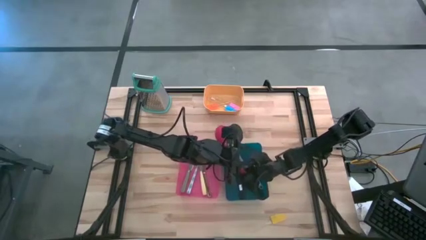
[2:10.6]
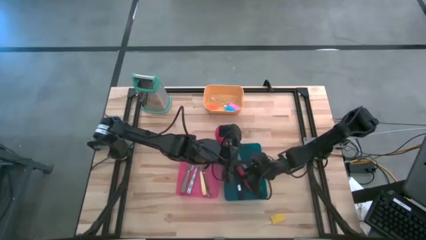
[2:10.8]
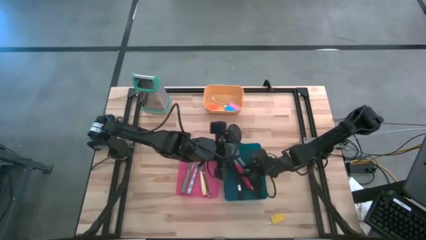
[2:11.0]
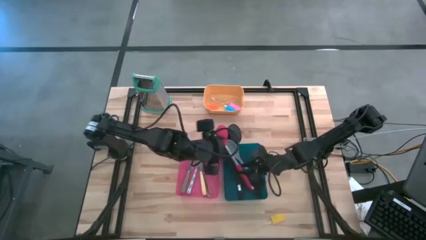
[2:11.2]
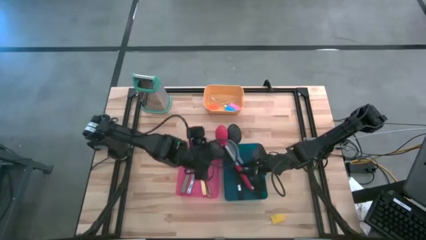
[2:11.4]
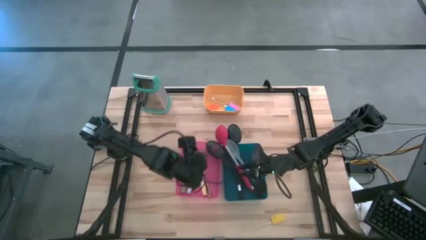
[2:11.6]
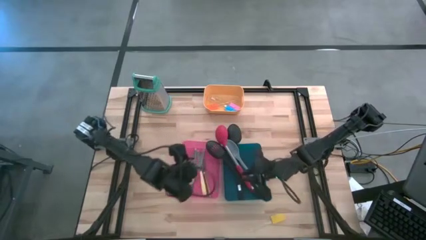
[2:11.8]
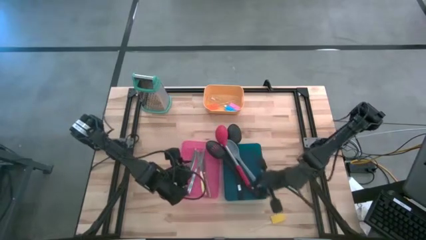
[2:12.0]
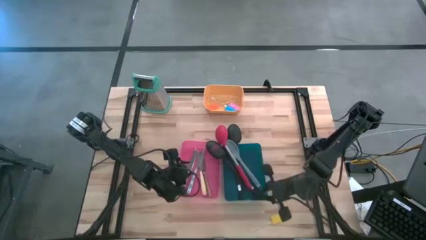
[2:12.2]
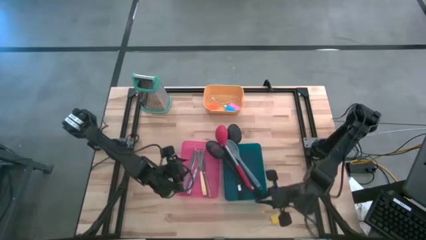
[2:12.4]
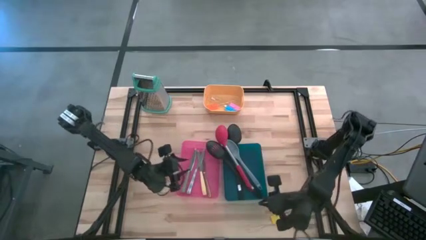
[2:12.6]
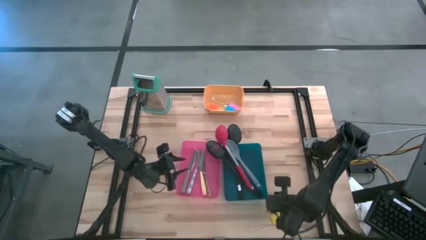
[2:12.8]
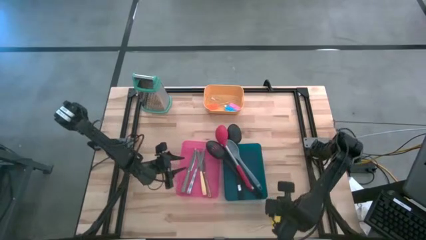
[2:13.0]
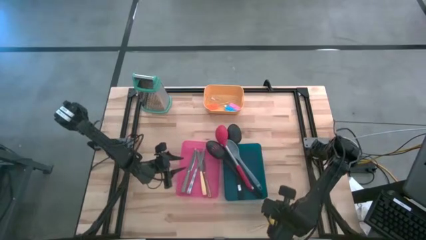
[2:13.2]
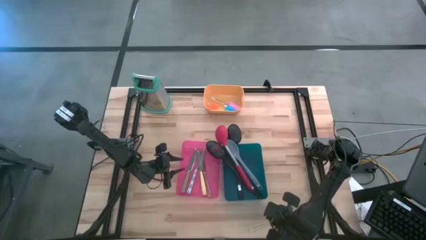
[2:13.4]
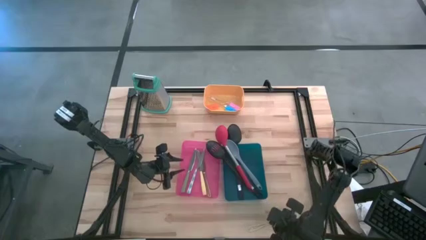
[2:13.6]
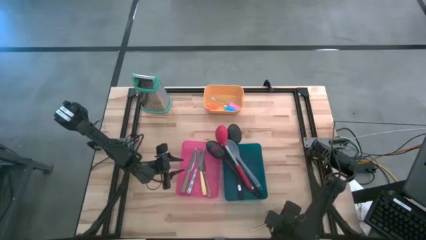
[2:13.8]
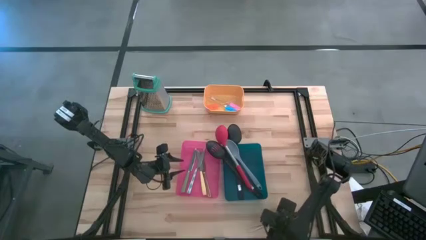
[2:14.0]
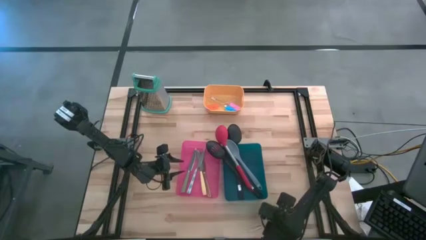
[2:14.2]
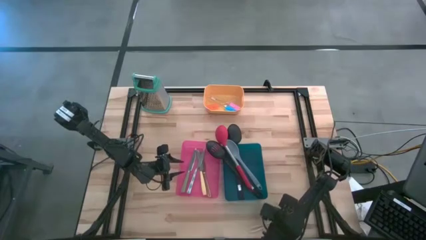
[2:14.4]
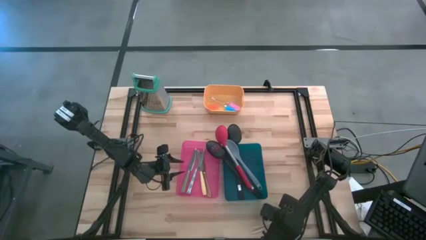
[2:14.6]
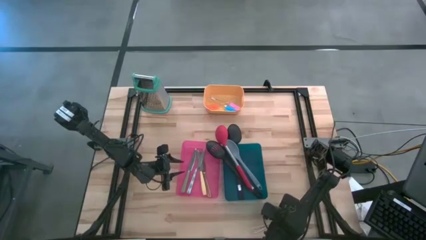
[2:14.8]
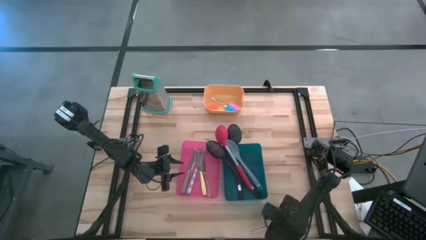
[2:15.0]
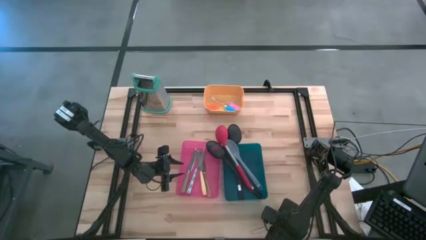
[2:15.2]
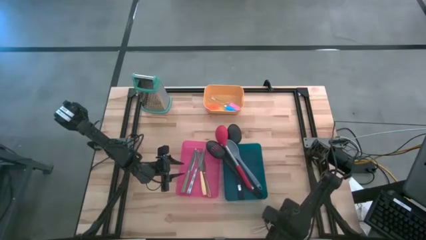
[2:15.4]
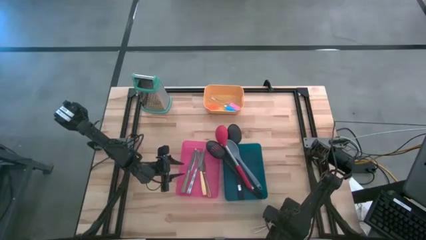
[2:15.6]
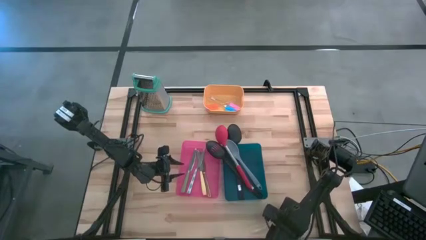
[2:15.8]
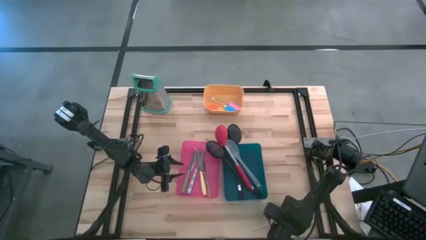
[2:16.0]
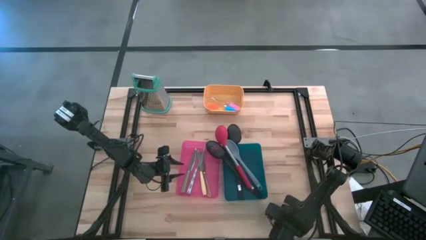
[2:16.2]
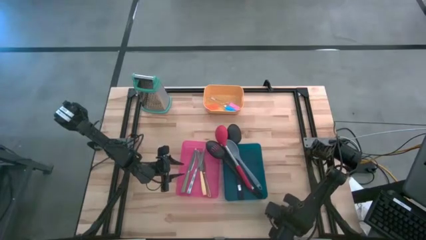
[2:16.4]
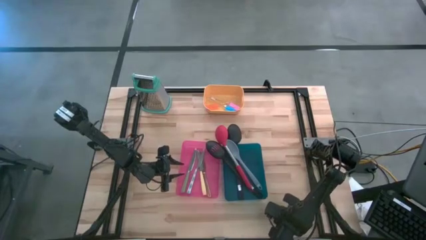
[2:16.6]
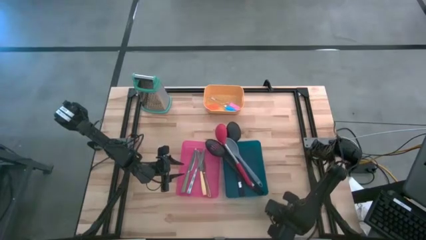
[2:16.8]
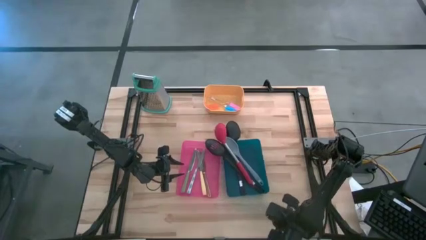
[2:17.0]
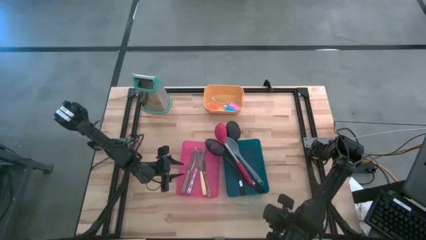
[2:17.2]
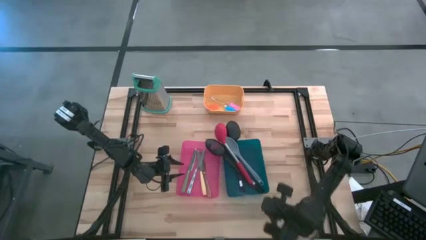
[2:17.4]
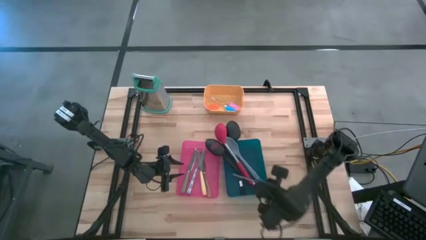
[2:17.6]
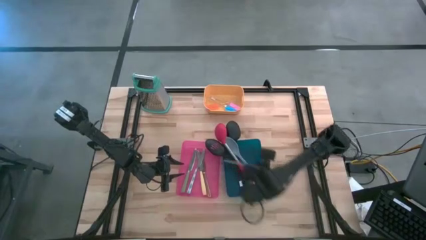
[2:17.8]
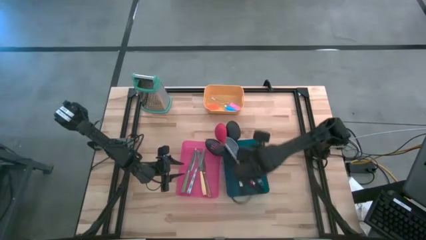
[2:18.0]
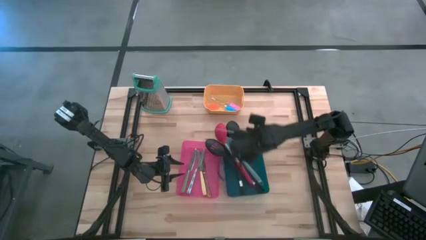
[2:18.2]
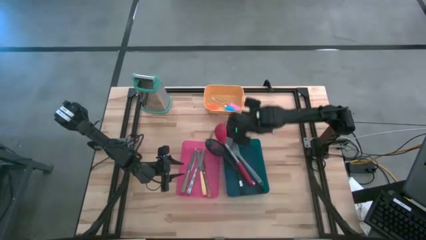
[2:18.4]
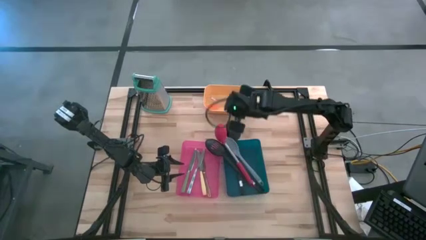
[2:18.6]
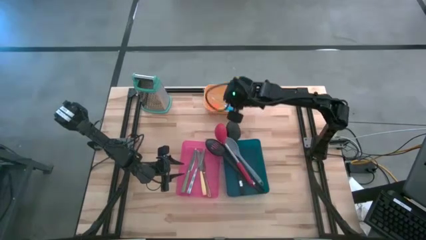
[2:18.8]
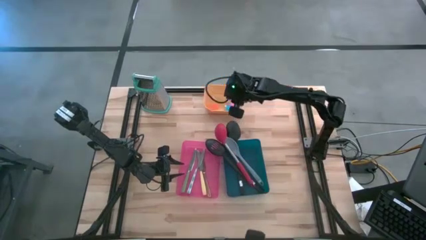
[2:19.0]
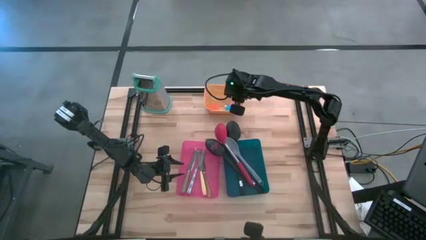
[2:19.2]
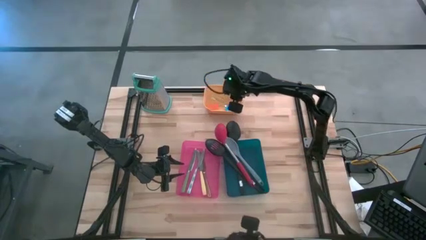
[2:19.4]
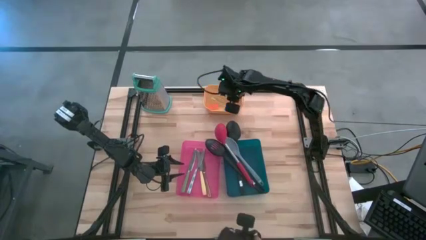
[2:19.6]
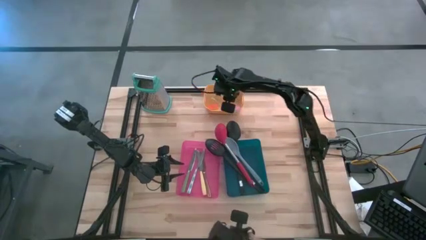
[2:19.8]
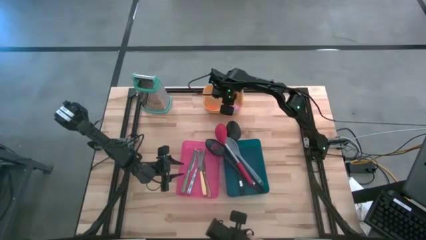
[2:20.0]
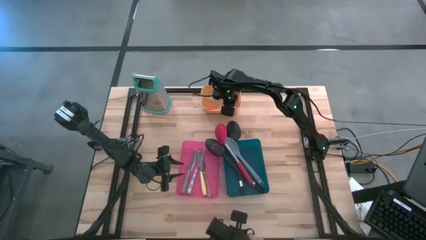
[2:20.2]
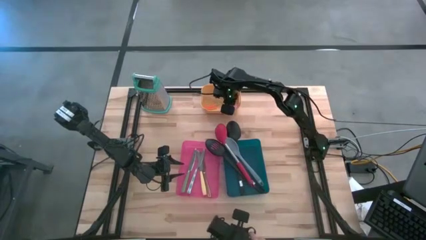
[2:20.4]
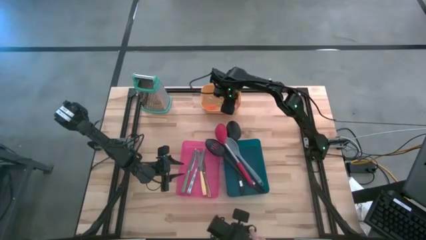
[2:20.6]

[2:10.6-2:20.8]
Task: Pick & Place Kitchen Items
Put the yellow spatula into the yellow bin

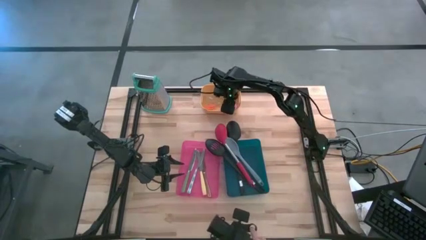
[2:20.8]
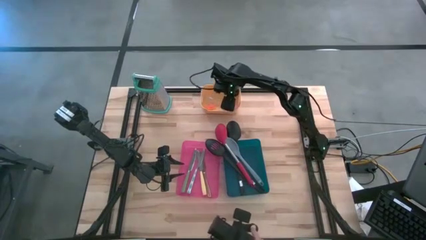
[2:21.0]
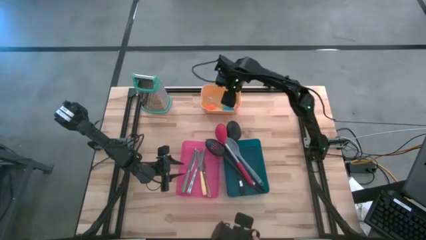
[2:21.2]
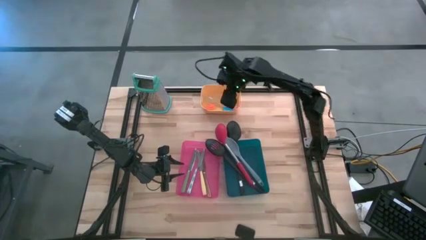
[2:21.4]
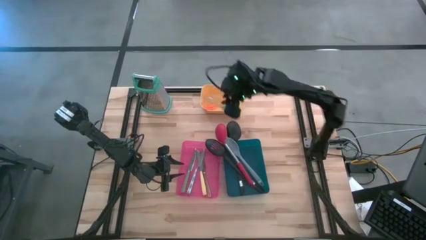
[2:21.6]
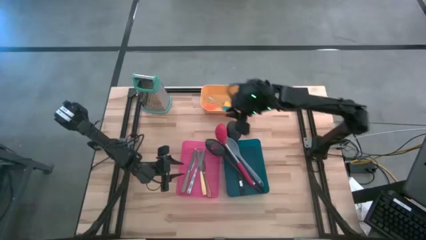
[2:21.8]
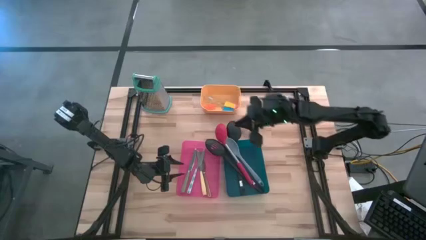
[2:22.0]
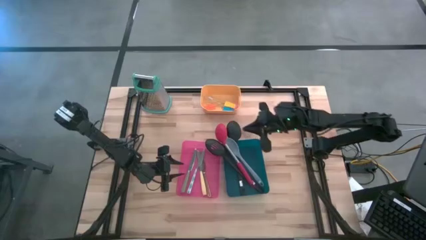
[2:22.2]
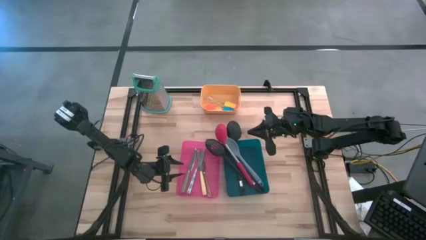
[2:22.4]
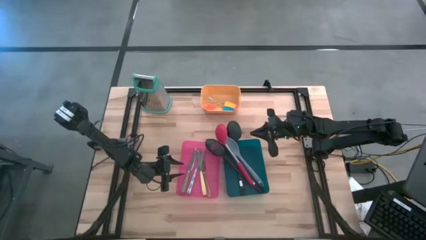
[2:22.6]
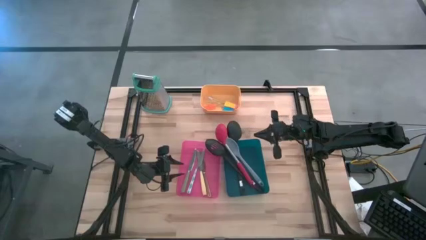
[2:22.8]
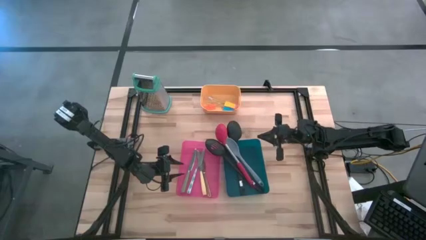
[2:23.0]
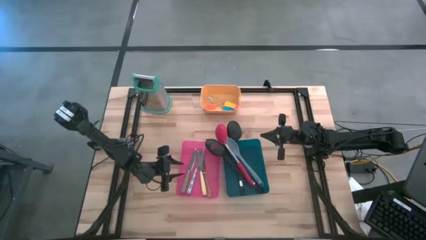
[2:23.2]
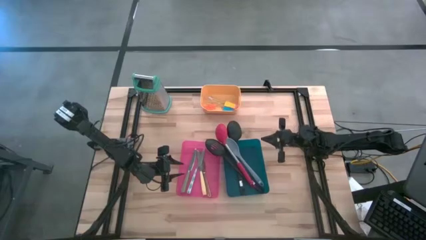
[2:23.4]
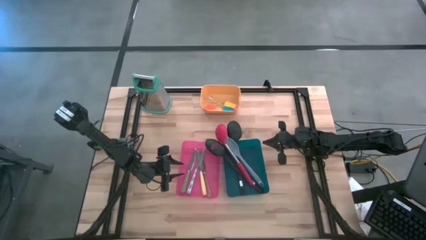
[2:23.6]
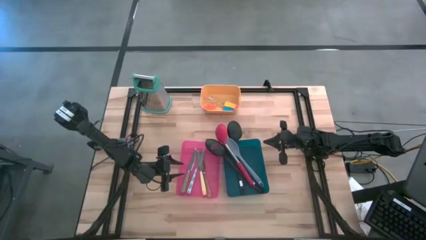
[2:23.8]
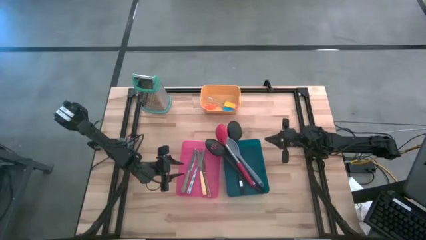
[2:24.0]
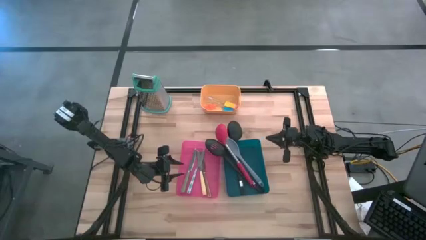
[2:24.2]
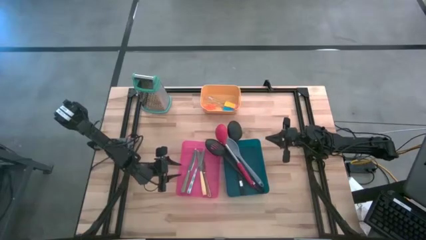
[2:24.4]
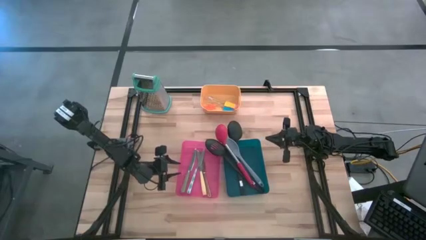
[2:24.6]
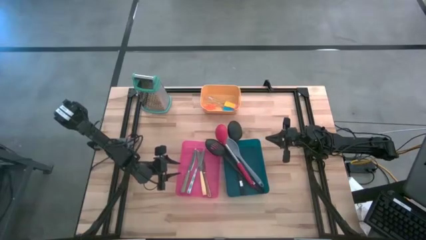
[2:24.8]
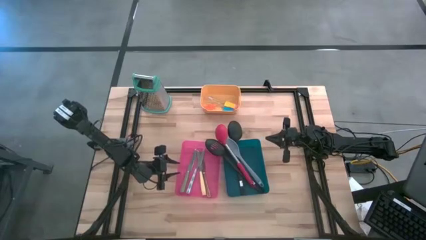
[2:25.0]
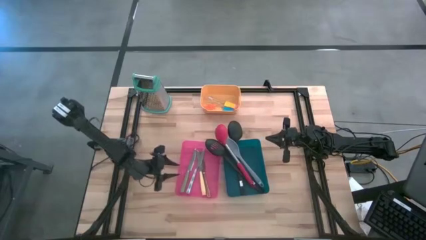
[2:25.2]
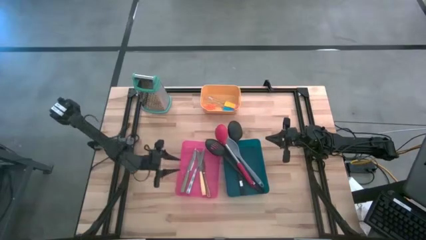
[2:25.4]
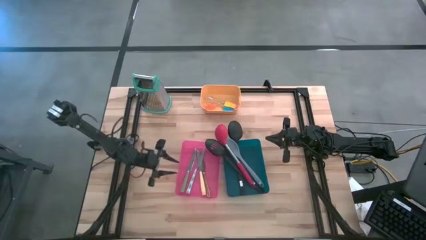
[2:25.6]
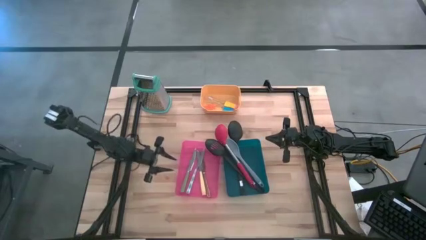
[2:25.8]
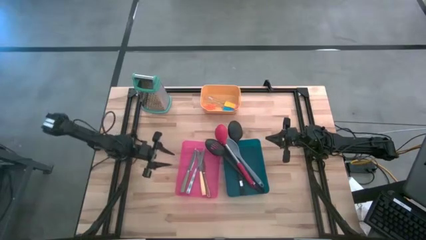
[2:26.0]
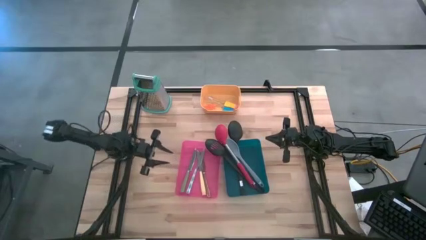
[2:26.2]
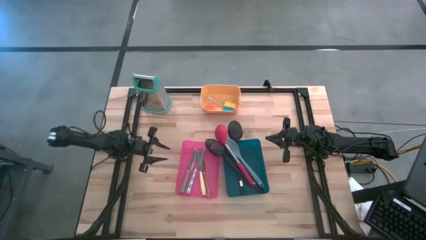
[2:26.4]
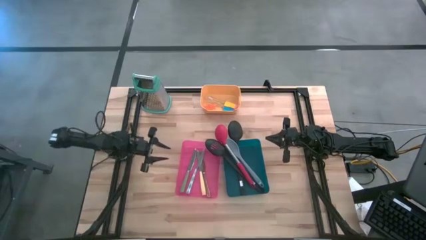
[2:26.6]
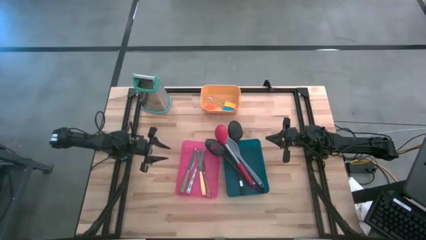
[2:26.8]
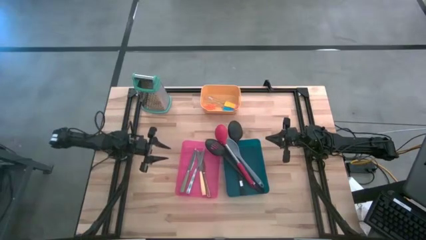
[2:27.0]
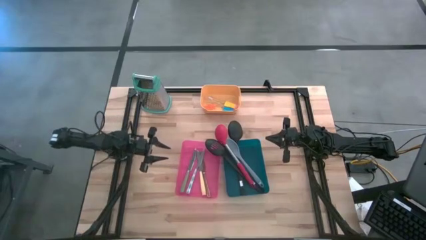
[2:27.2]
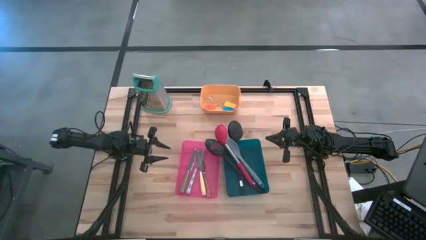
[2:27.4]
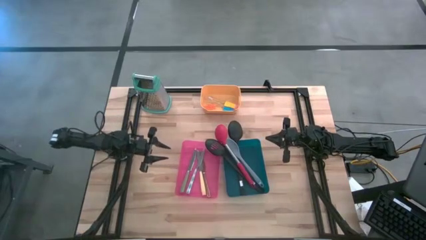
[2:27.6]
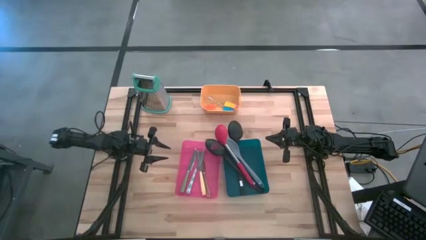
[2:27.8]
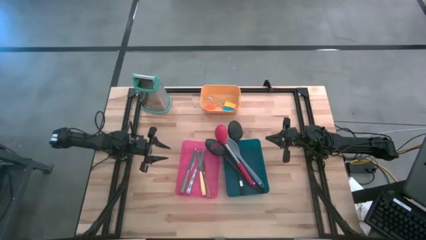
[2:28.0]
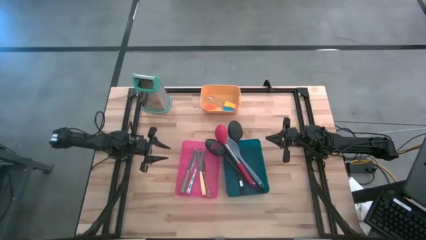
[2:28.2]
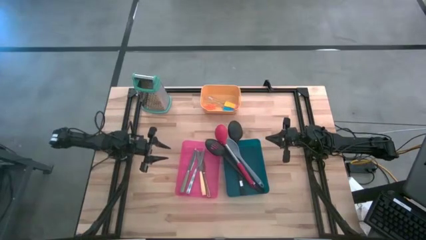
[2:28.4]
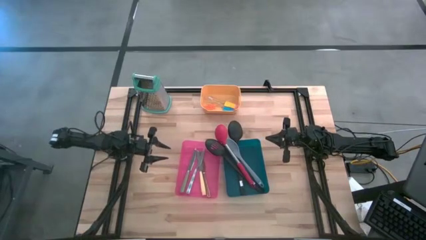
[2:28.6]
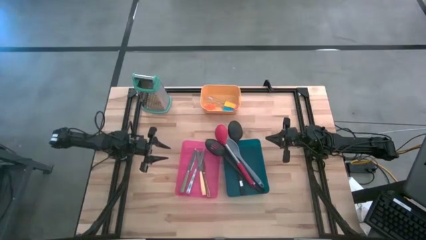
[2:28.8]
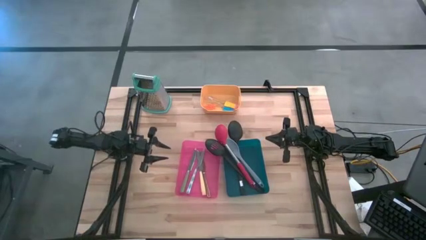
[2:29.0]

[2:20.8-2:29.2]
Return to Home Position
